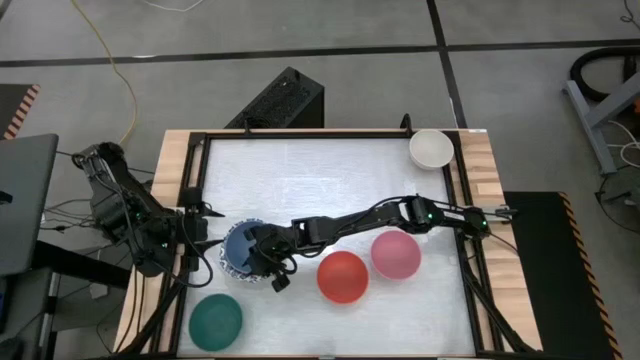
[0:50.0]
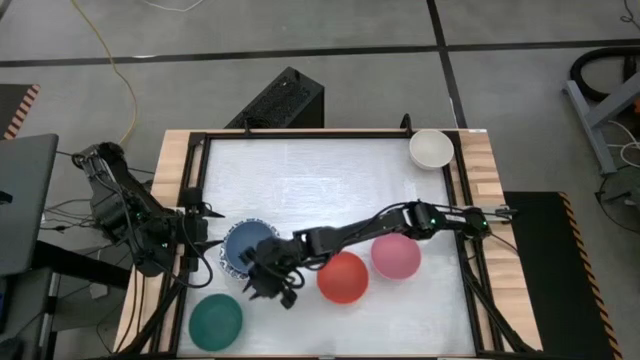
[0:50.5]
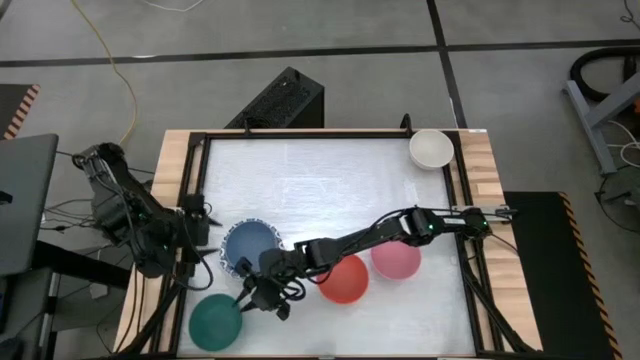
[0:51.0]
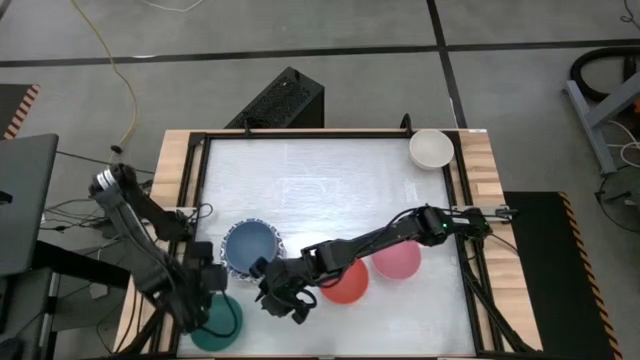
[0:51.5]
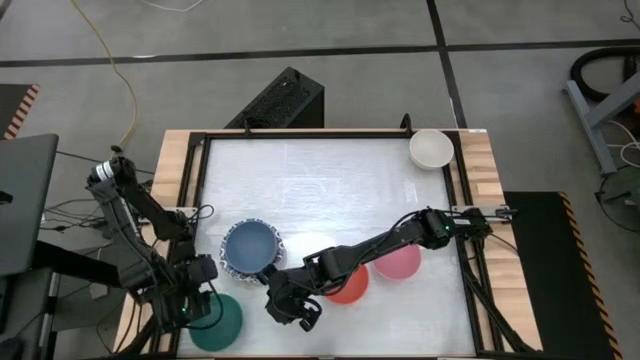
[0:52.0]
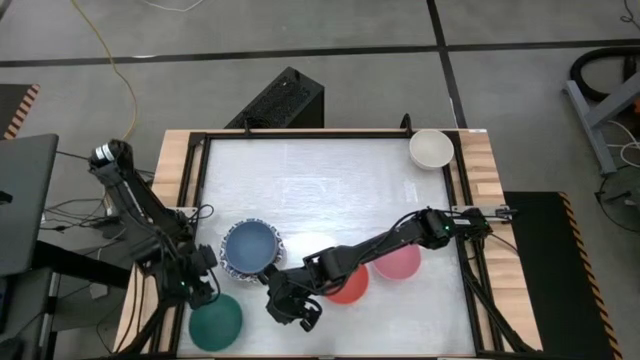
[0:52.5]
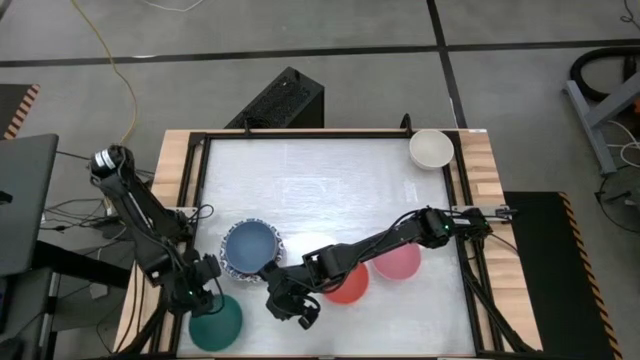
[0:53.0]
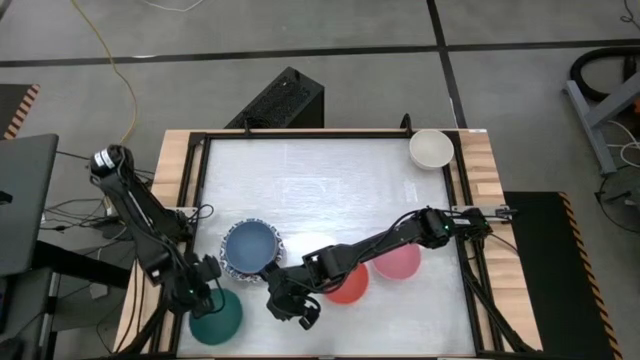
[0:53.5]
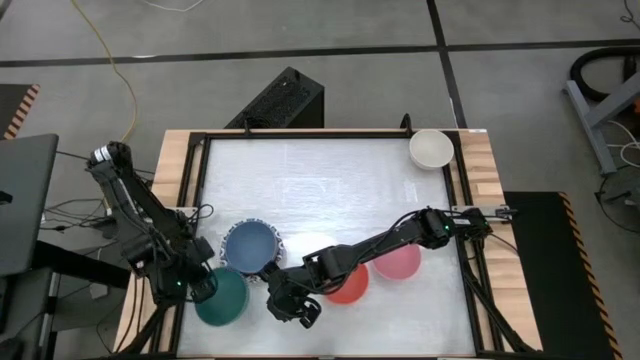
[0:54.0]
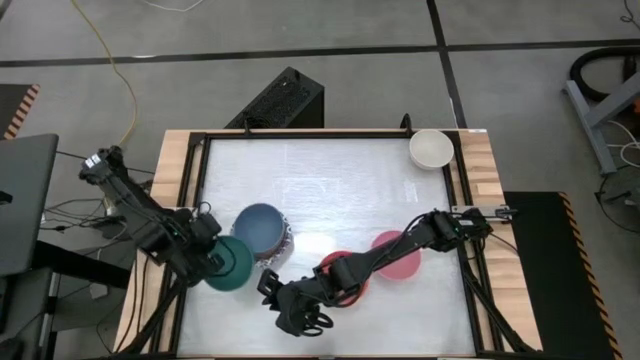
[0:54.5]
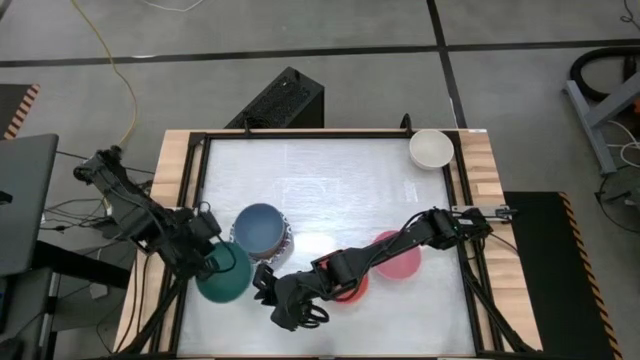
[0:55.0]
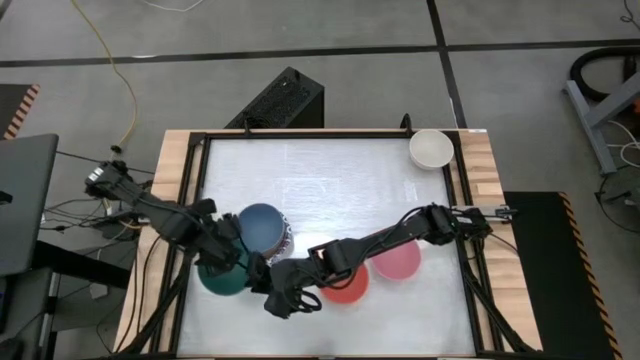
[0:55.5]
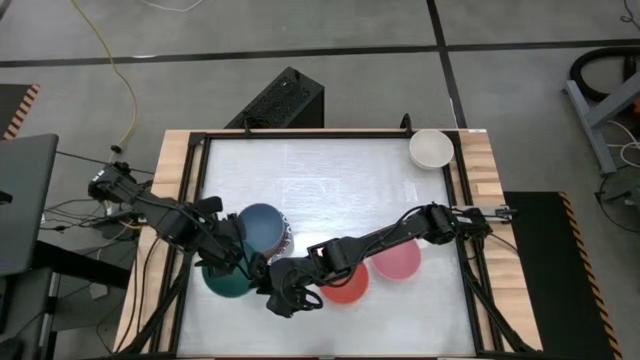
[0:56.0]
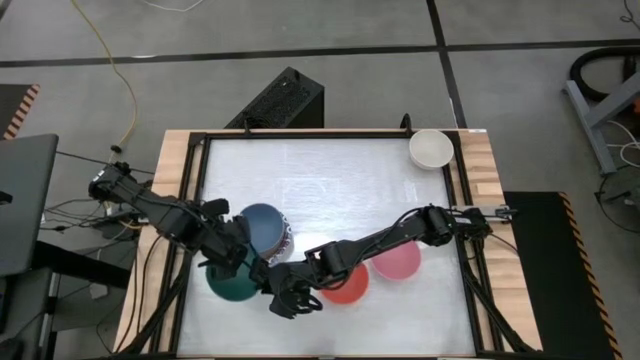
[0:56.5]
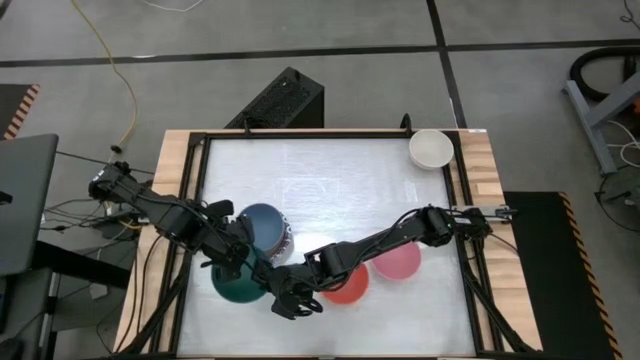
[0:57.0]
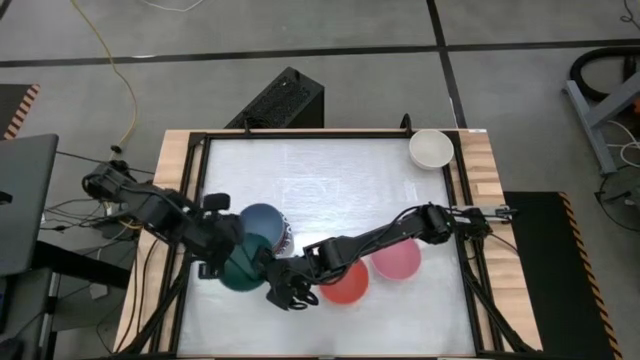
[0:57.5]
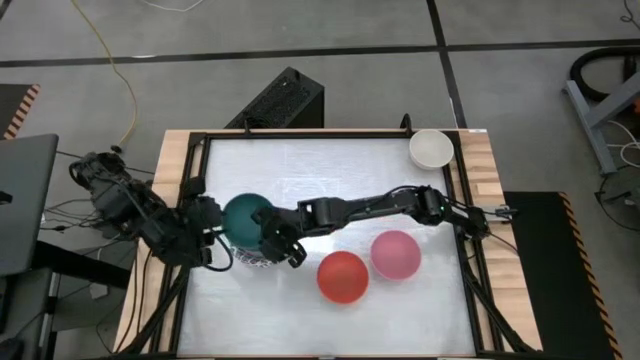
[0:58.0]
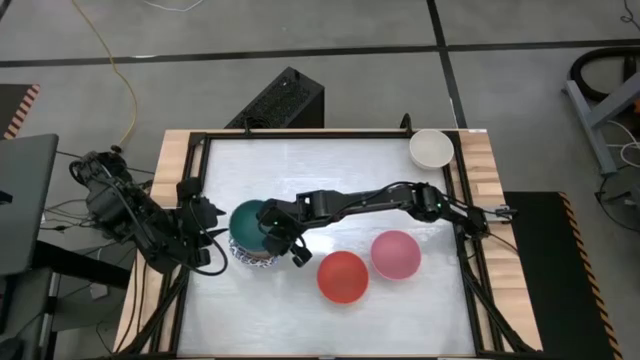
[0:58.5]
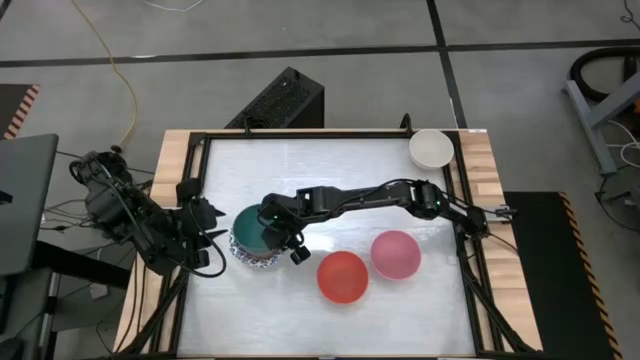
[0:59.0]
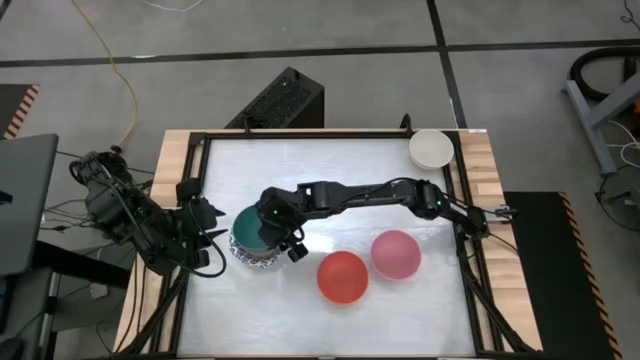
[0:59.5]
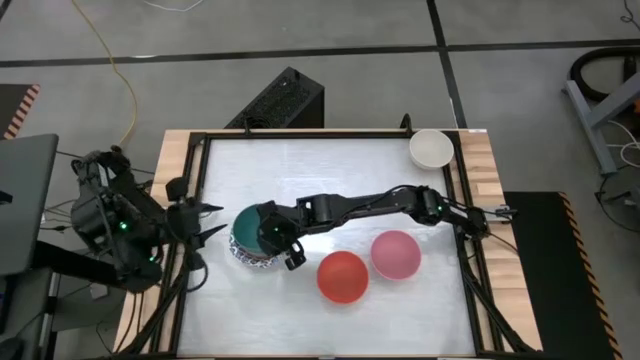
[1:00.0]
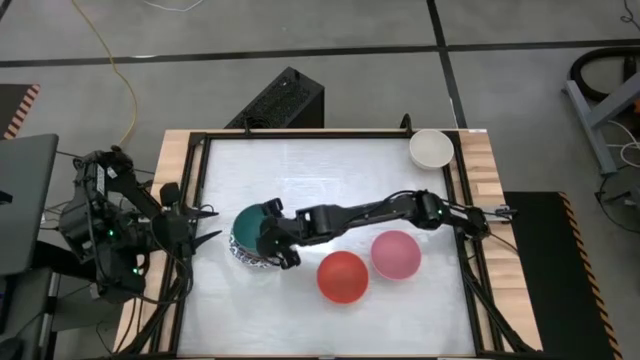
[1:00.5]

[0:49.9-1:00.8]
Stack the green bowl on top of the blue bowl

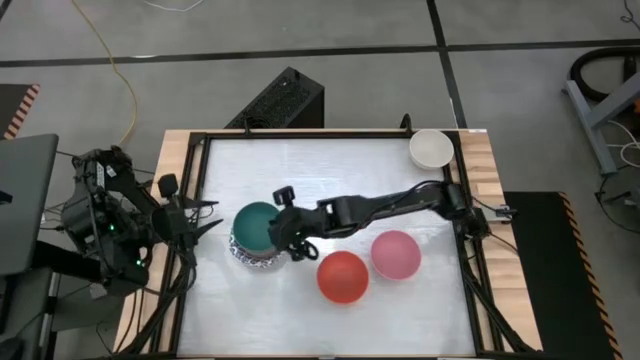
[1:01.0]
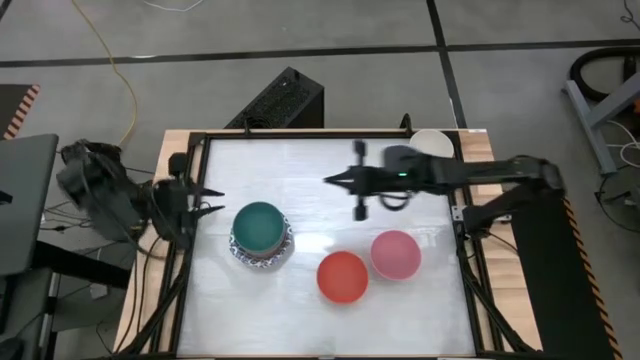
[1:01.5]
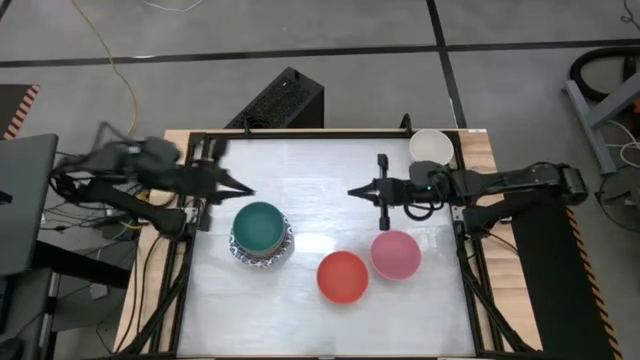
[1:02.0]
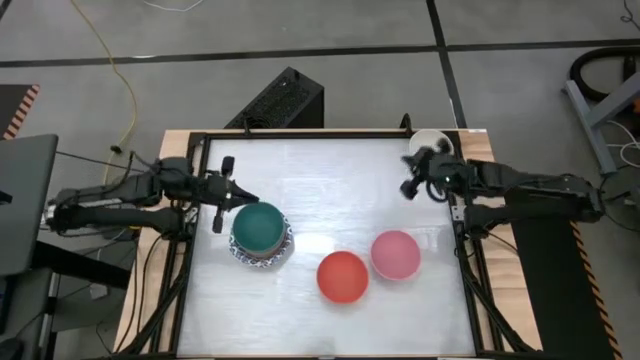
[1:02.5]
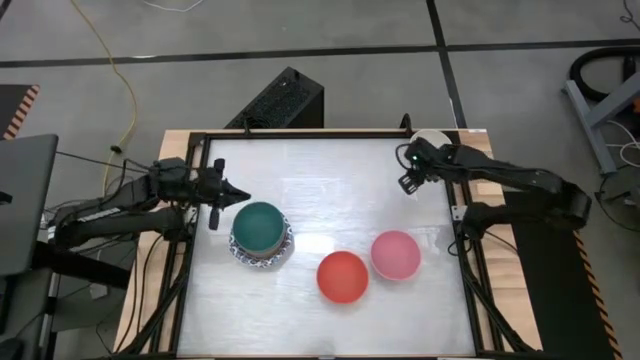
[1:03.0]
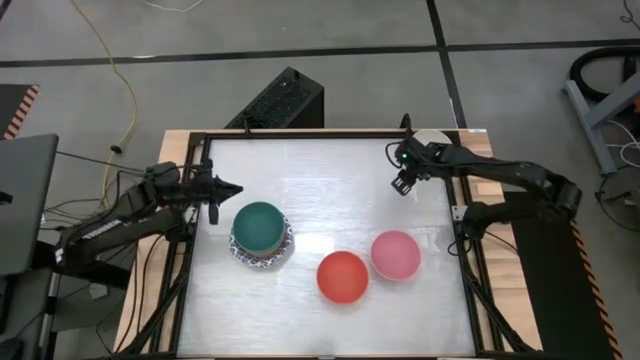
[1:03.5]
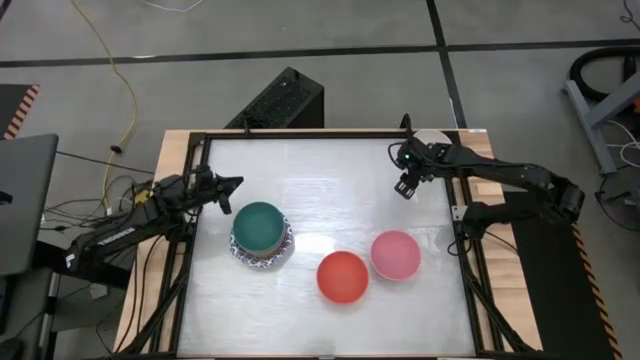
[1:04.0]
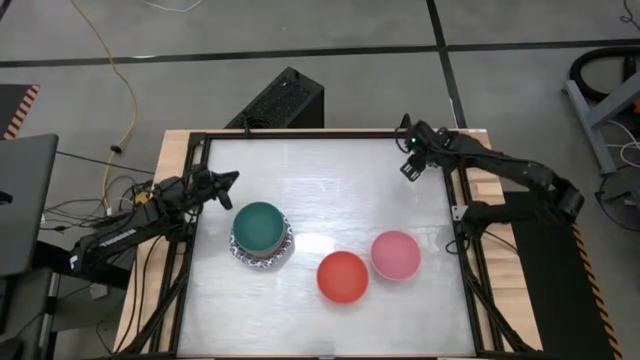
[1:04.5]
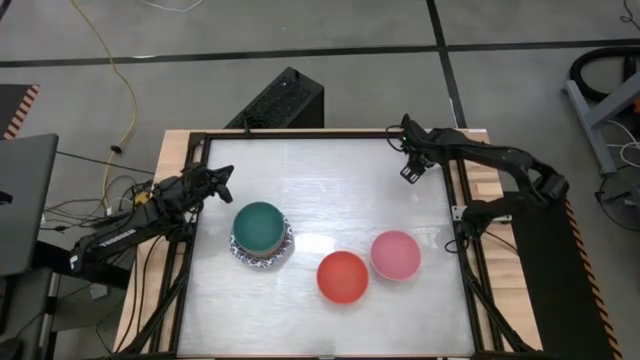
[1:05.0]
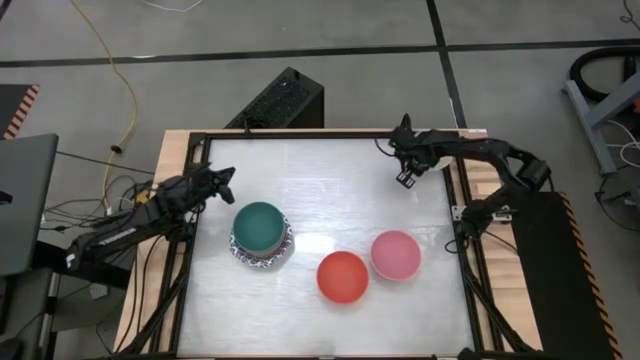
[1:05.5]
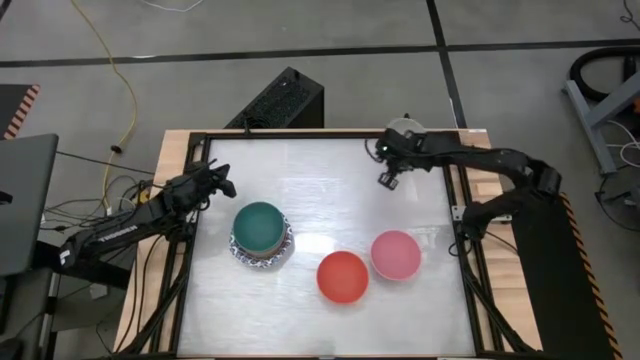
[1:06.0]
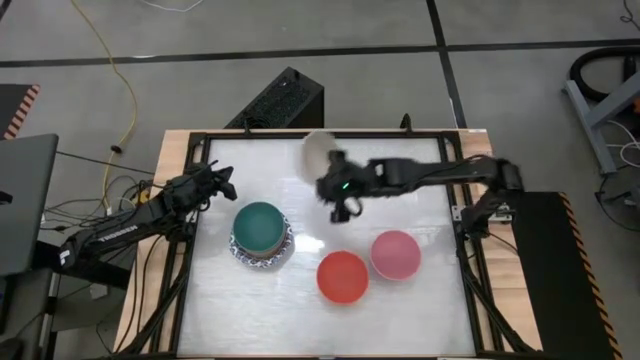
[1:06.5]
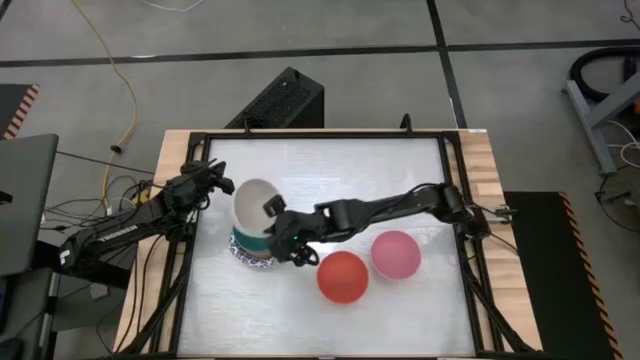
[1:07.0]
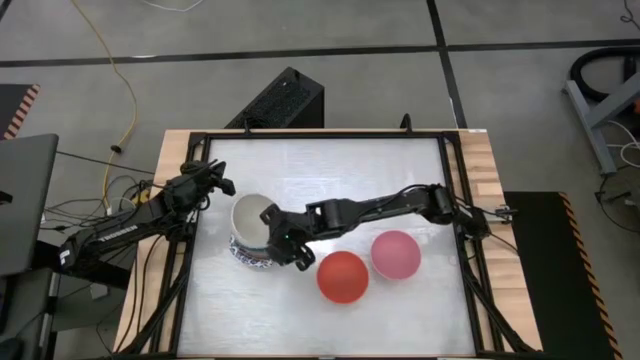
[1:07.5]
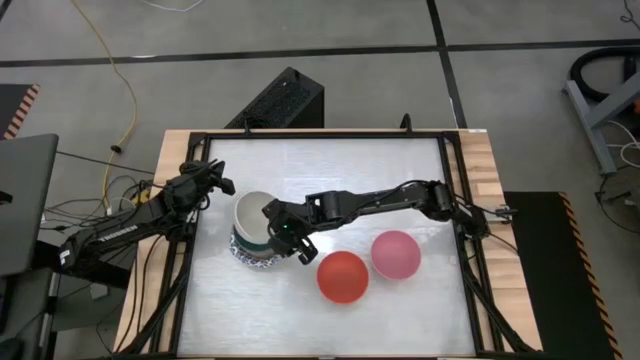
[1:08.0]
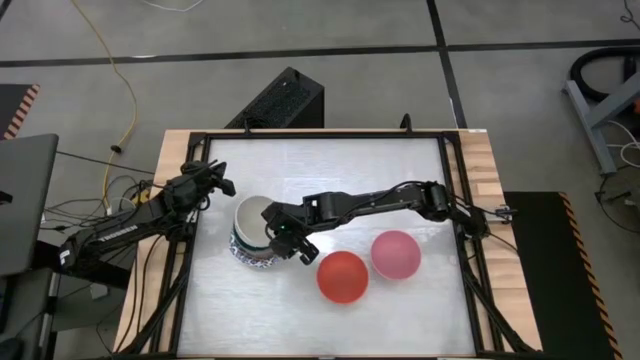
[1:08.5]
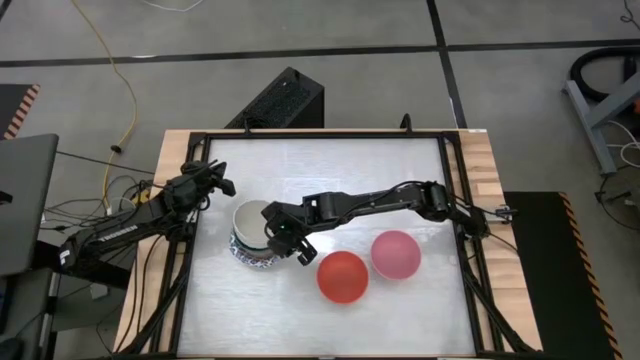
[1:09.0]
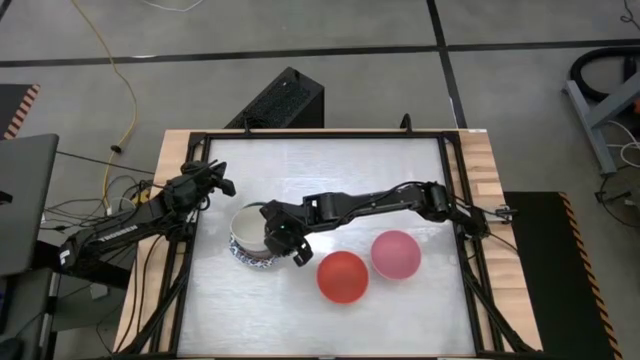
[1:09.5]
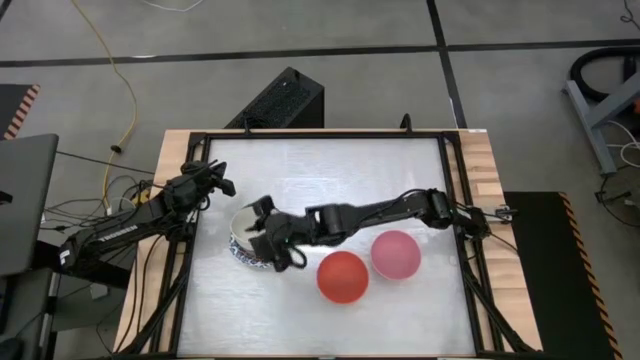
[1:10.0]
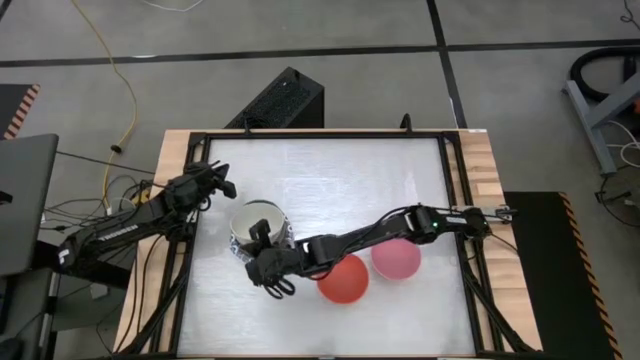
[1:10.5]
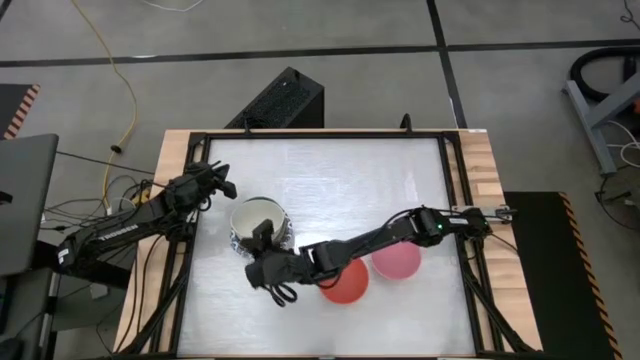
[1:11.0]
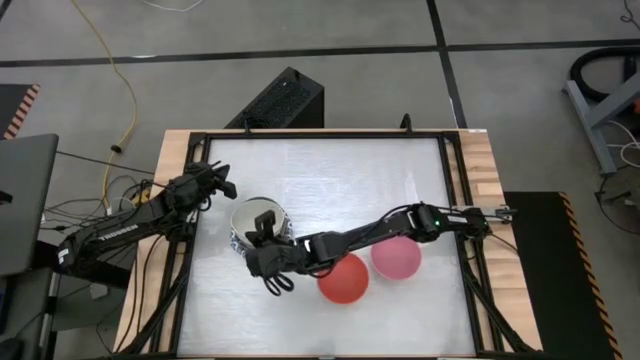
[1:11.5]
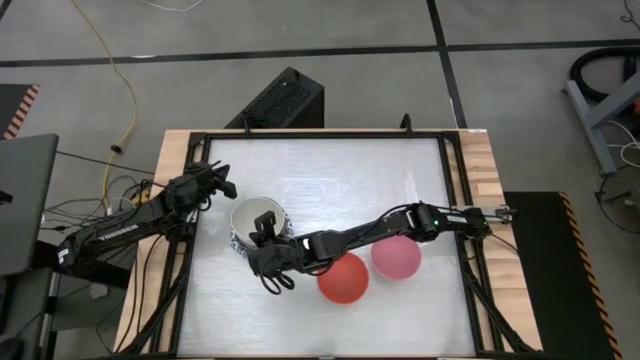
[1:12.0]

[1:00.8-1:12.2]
Stack the white bowl on top of the green bowl
